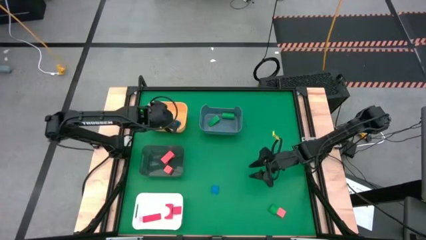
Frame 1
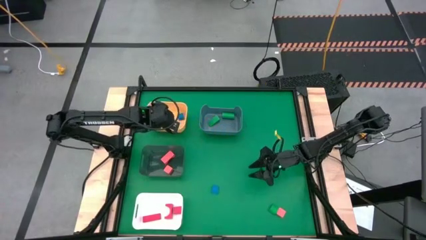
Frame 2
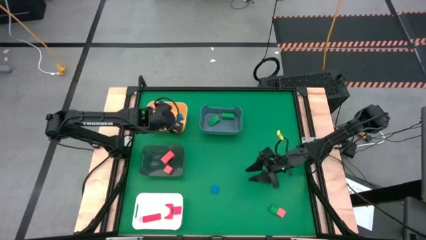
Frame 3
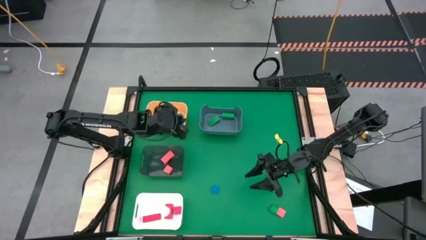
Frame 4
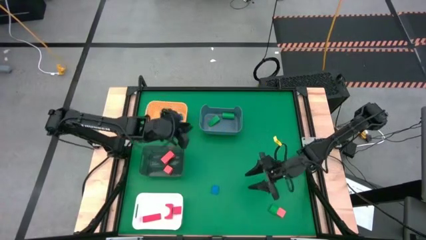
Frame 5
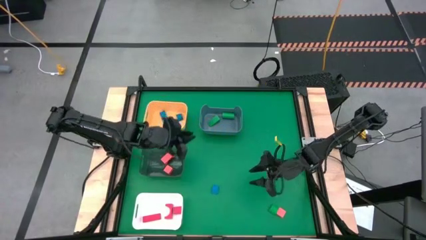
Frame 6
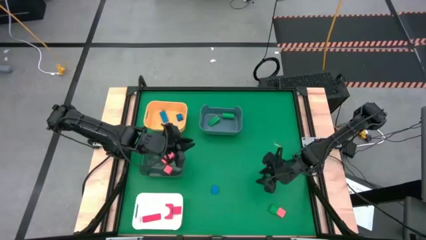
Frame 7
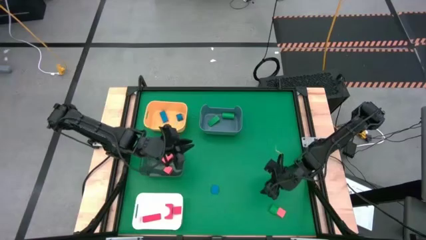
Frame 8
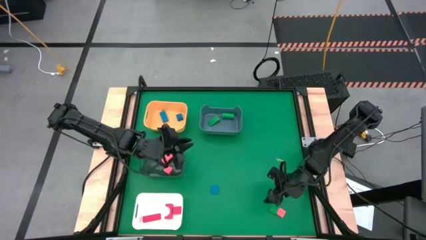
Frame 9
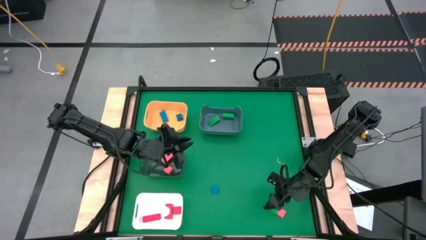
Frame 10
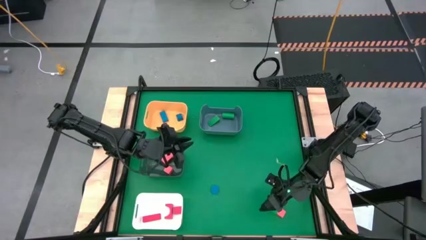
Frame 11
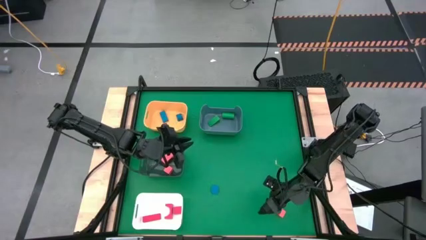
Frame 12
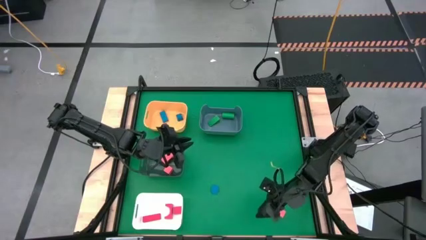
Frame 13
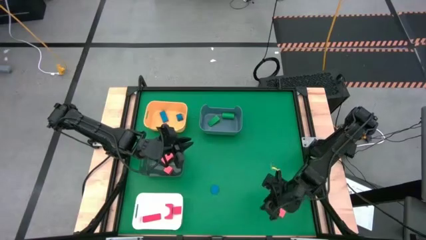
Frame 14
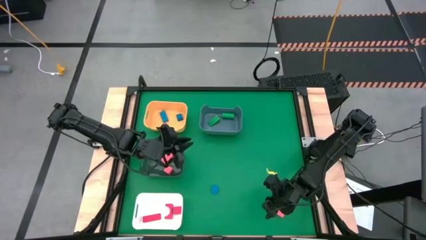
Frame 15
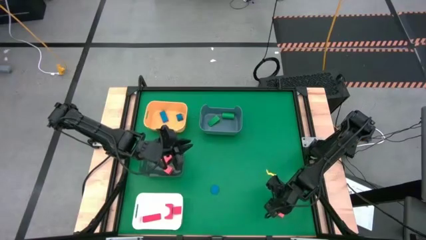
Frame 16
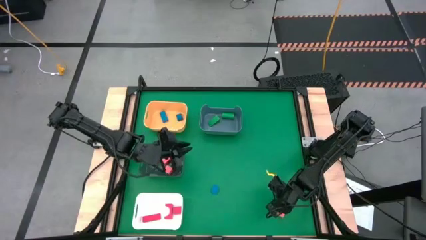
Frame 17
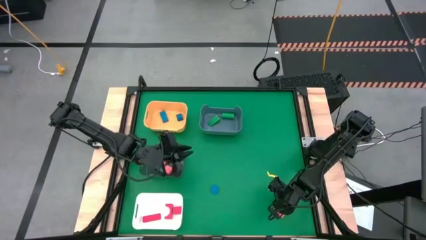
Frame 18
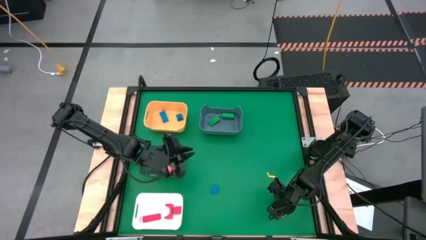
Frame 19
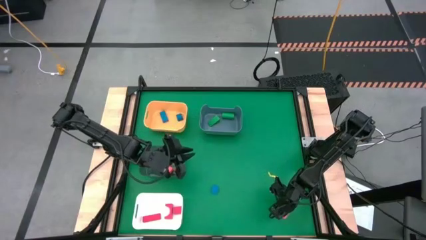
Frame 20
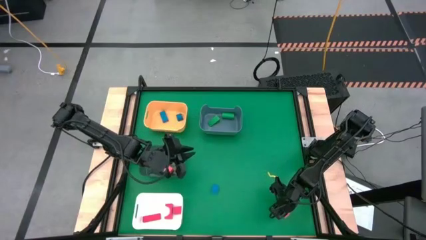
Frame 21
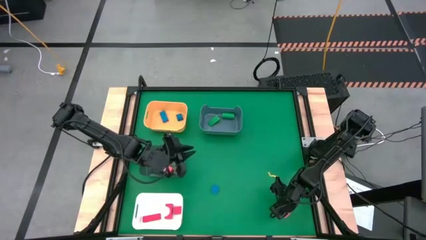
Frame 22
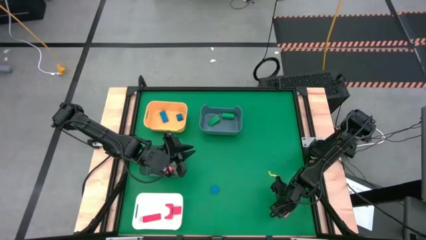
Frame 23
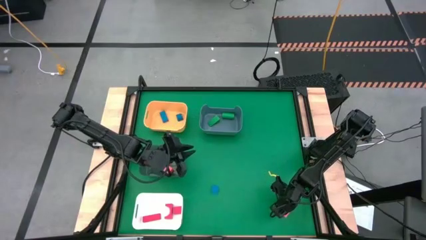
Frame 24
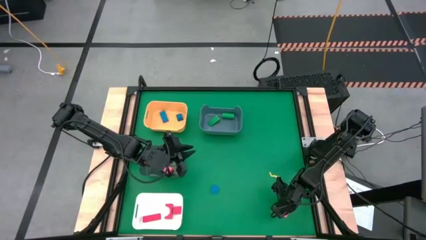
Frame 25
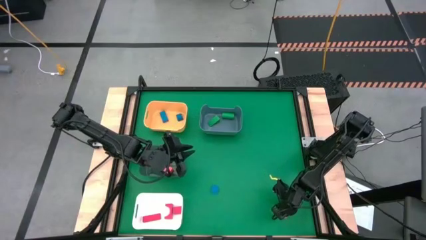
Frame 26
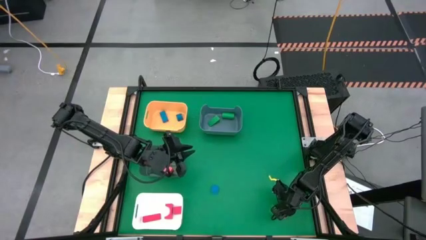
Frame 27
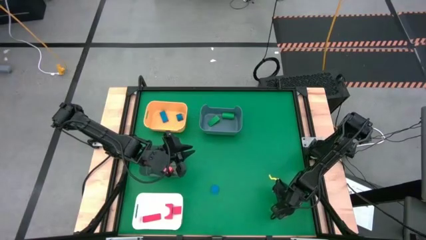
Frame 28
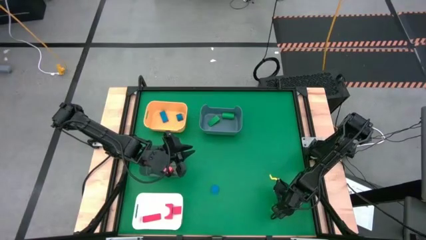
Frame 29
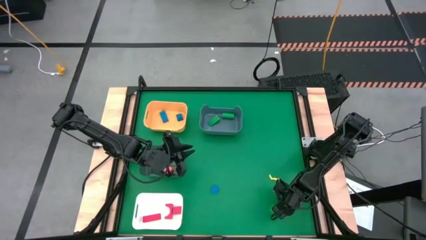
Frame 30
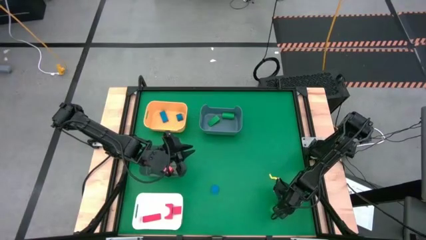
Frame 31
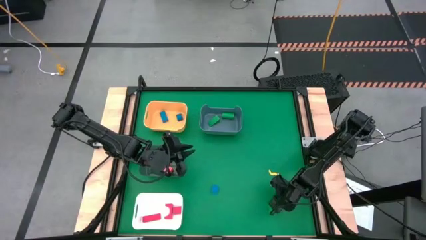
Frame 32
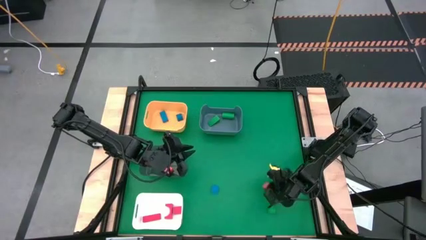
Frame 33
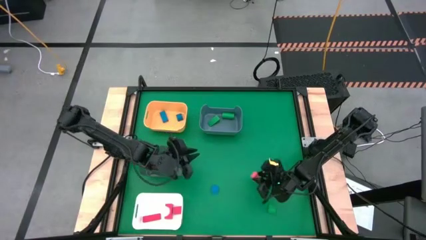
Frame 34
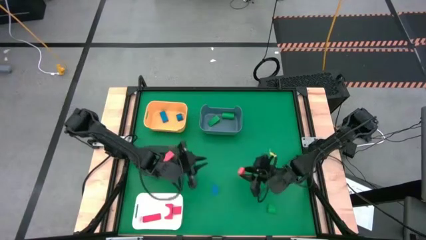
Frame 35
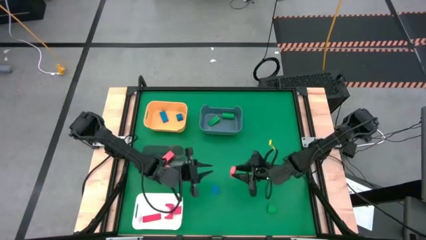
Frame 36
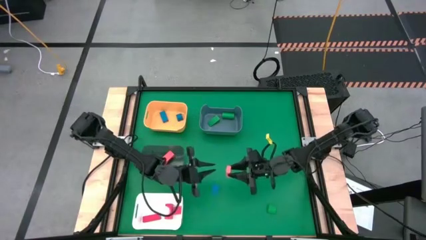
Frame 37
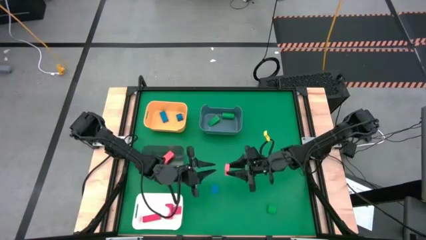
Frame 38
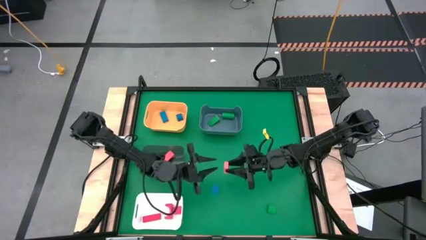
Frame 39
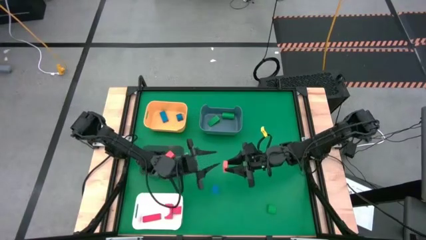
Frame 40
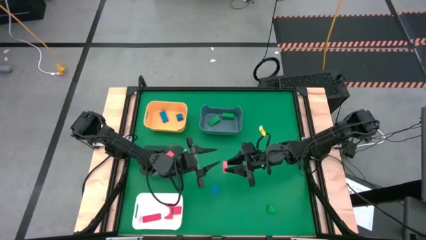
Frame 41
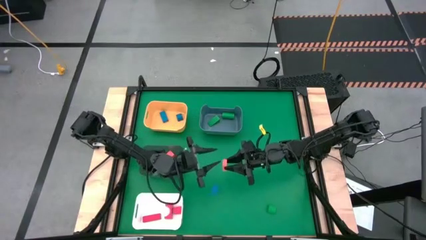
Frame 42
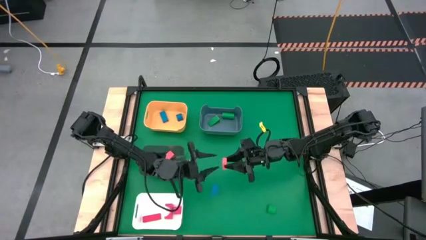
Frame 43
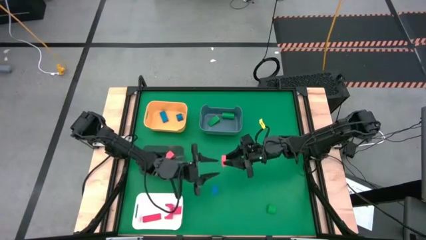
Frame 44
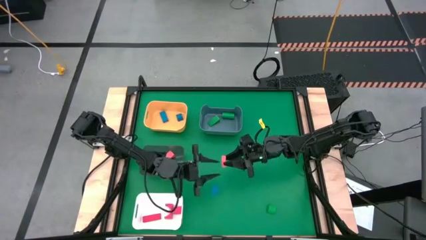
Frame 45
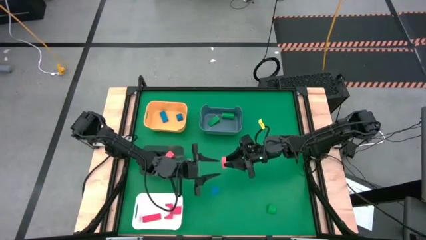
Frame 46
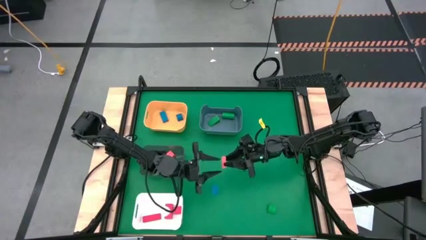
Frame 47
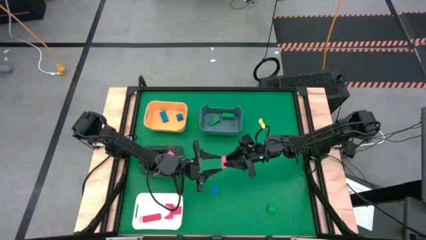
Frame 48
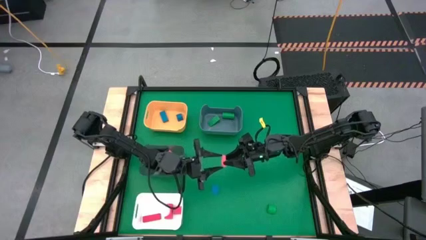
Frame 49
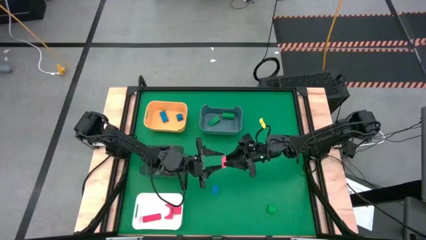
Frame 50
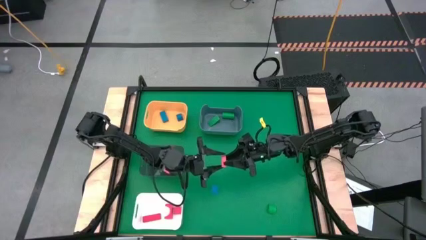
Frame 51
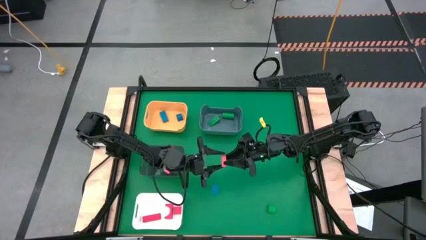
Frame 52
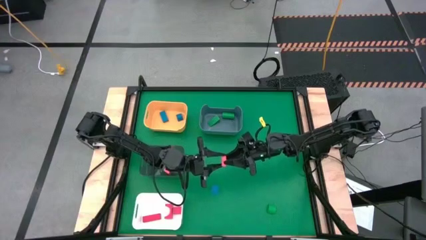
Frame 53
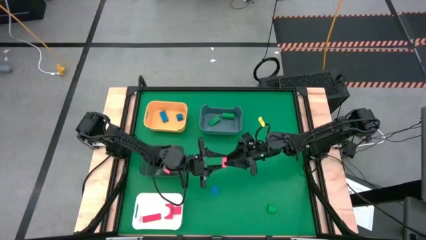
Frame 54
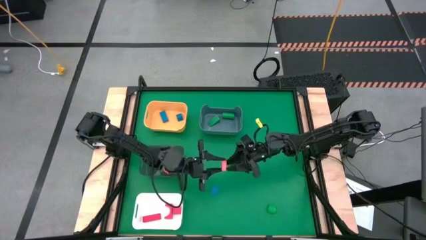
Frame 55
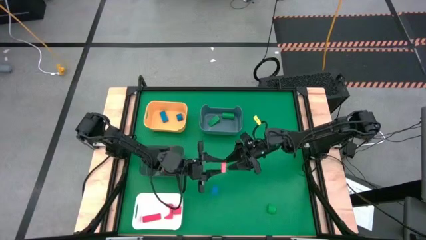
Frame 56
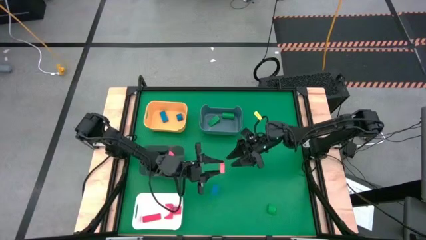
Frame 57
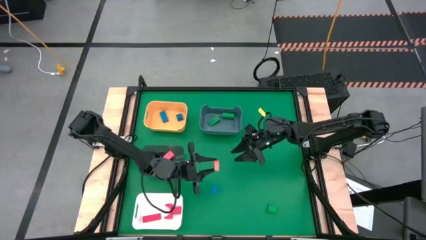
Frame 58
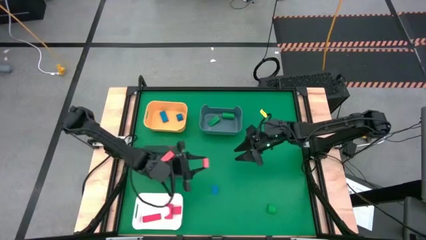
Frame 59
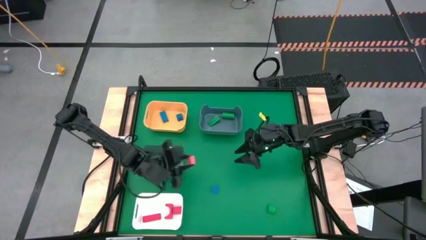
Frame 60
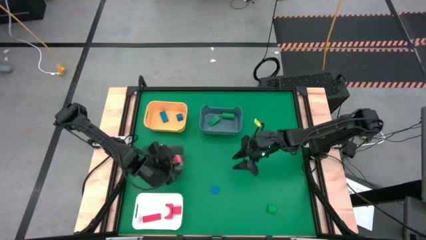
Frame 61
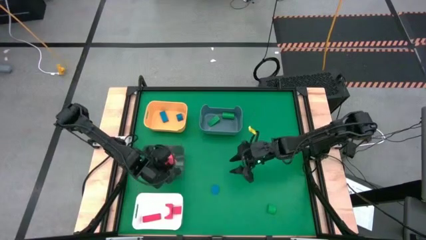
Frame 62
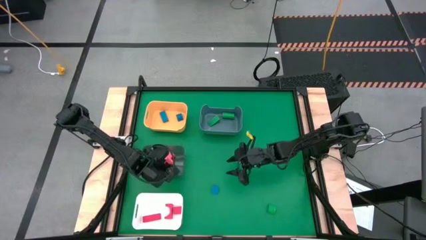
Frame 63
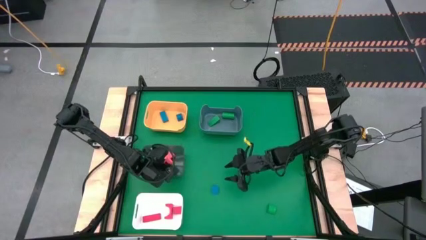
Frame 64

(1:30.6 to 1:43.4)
Task: Sort & place blocks by color
Put the orange square block into the black bin

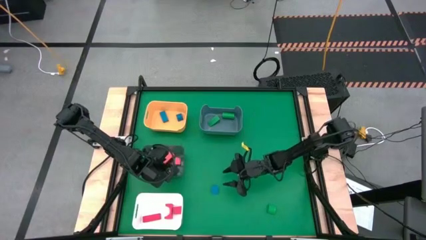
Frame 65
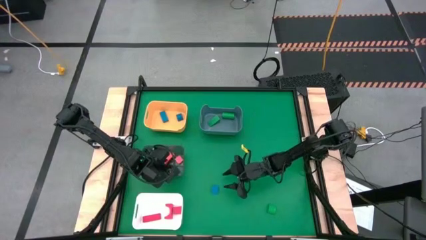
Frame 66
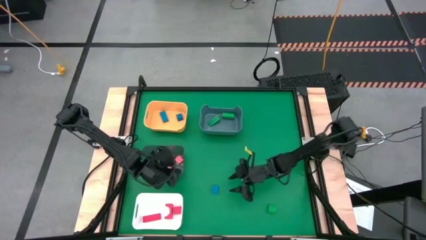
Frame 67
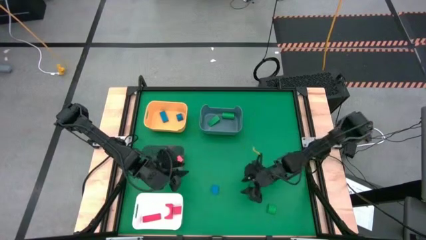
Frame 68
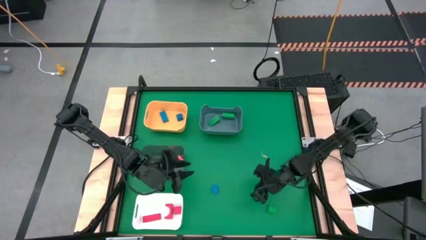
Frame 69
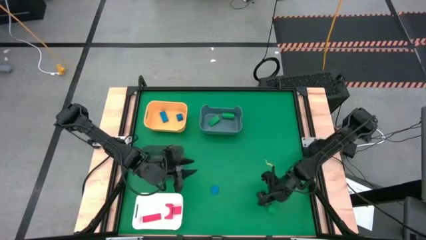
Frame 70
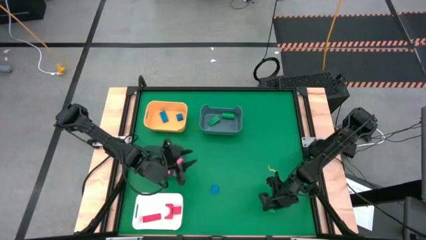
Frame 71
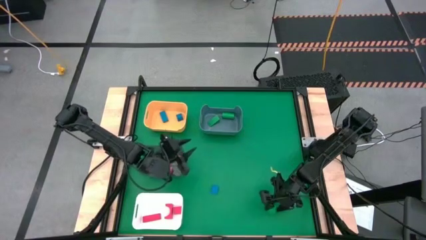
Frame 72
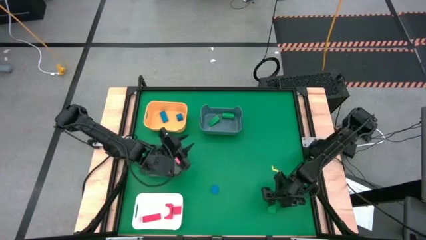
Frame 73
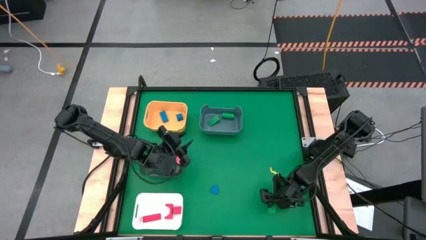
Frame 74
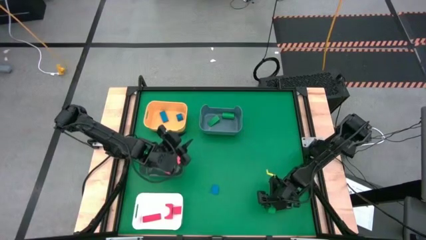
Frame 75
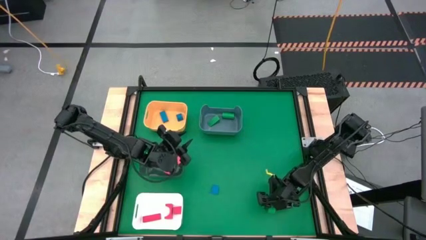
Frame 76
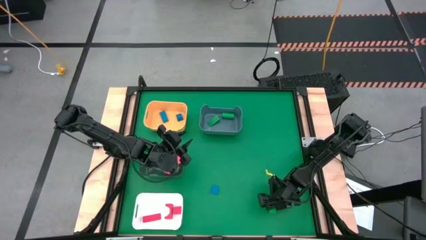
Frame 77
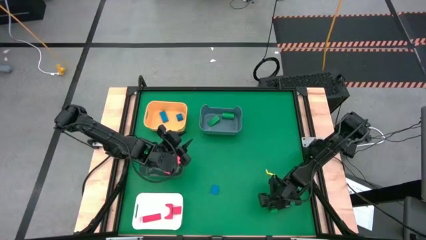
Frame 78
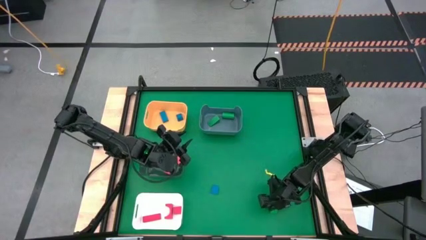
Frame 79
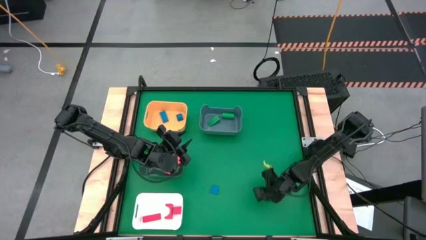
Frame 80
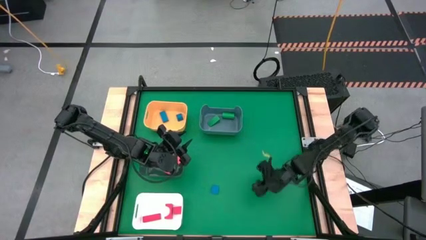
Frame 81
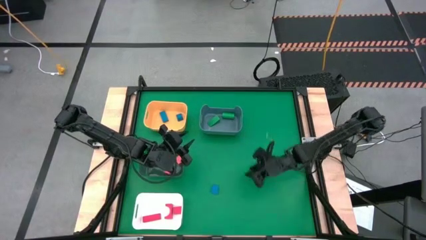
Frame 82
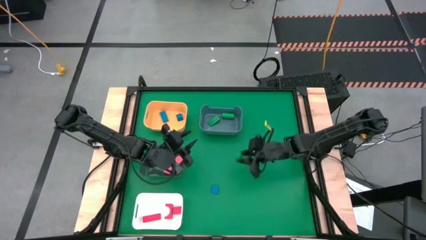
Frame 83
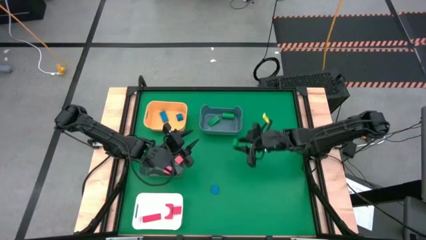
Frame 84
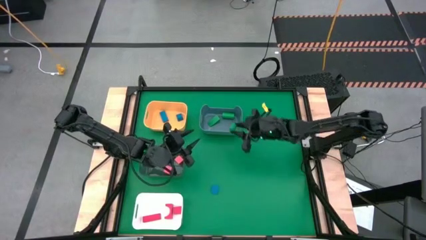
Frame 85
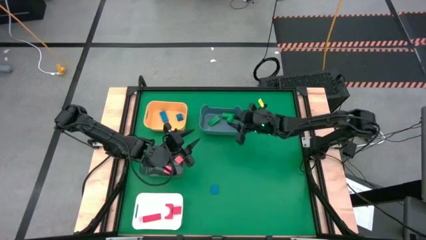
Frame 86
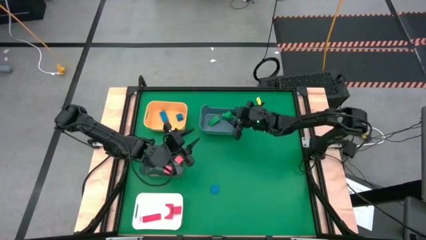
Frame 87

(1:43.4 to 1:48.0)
Put the green half circle block into the blue bin
